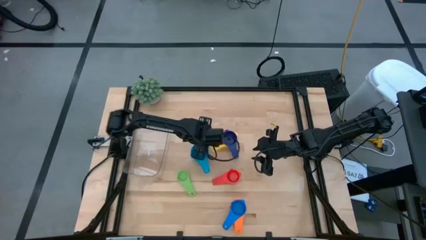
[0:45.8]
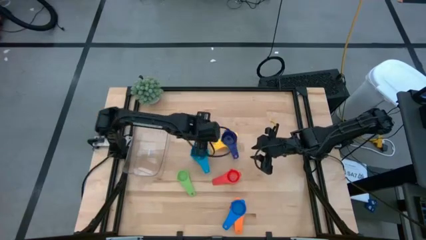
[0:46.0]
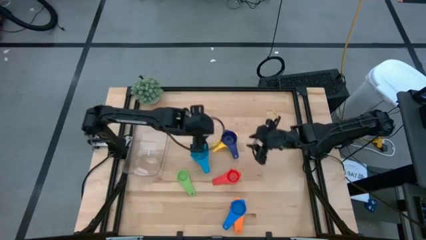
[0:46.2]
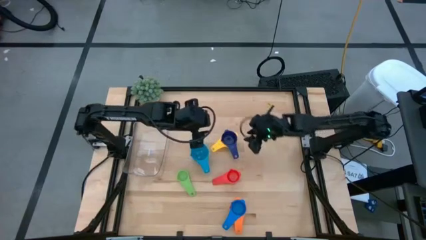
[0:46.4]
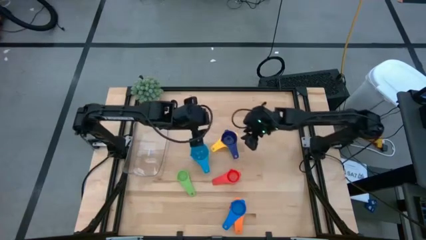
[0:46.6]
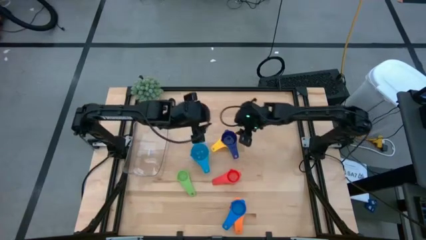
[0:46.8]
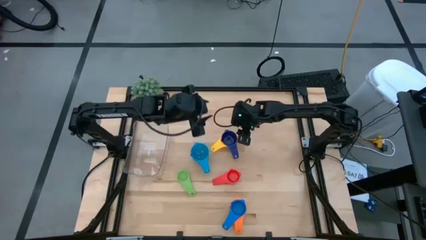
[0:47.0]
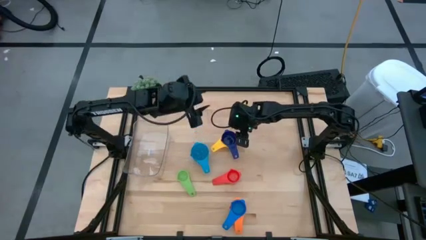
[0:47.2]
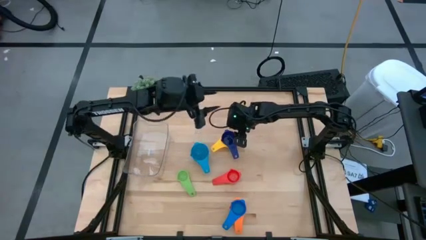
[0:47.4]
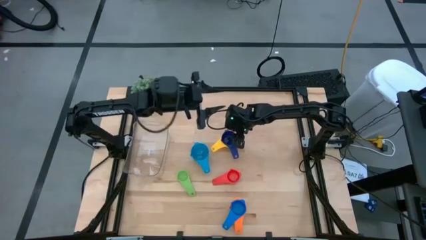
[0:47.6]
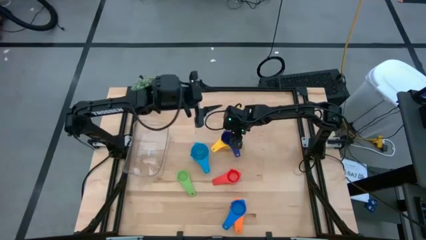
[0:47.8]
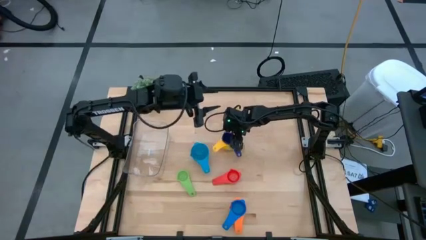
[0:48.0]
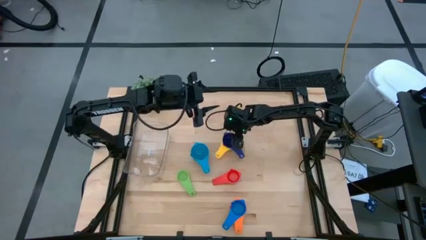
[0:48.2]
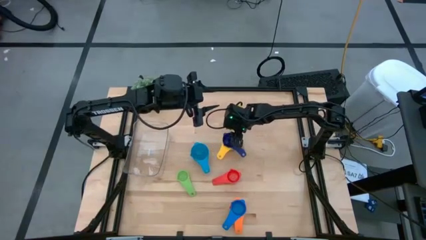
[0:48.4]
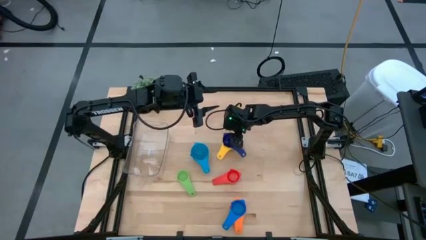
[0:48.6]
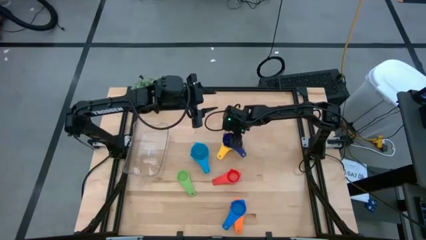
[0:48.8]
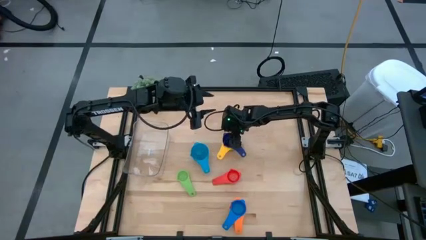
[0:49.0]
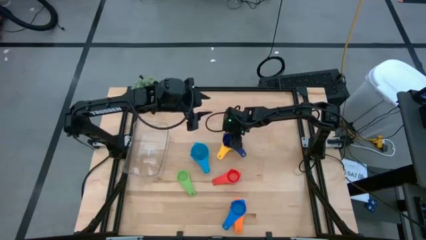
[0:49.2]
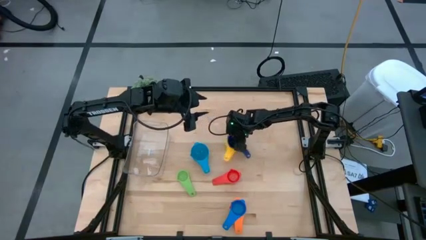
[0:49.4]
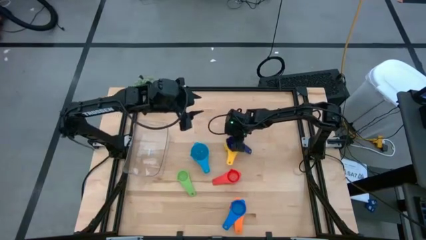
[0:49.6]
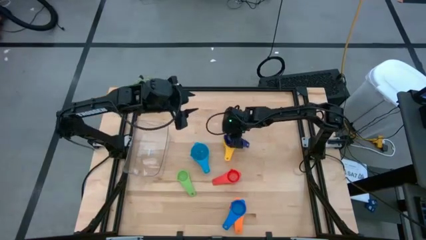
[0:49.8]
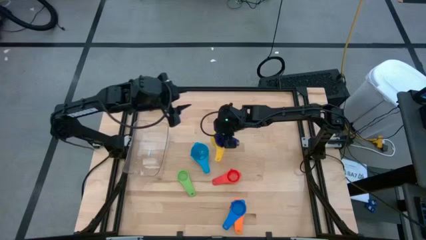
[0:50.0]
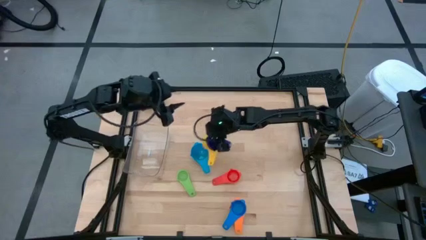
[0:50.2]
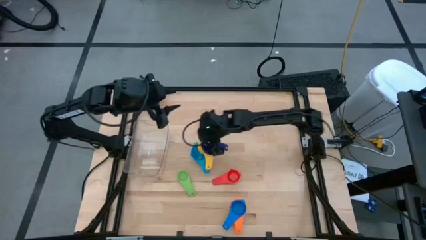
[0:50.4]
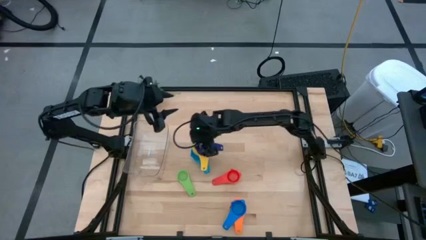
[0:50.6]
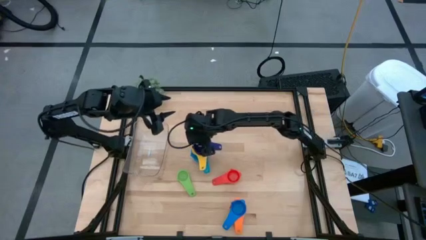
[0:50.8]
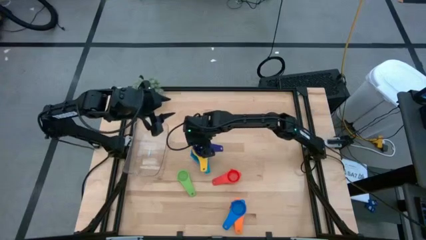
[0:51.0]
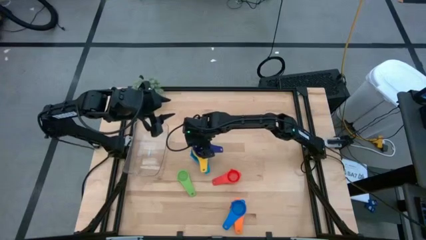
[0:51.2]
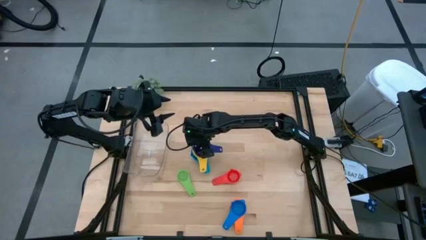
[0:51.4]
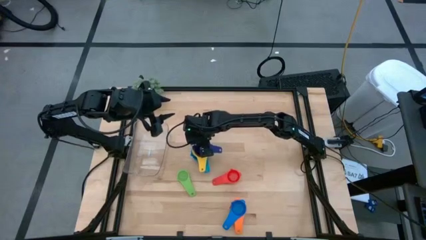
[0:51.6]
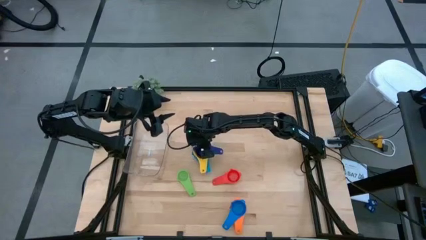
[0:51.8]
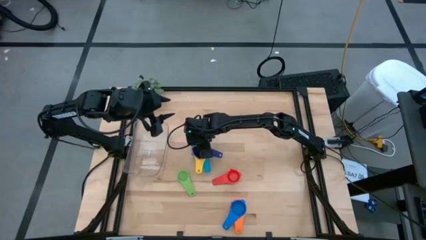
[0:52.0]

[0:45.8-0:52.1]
Task: Nest measuring cups in basket
Stack the top stacked measuring cup on top of the blue measuring cup

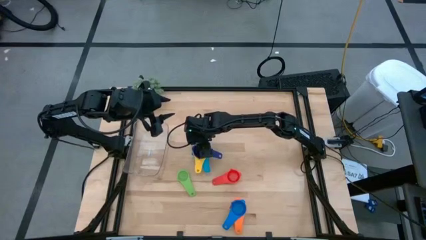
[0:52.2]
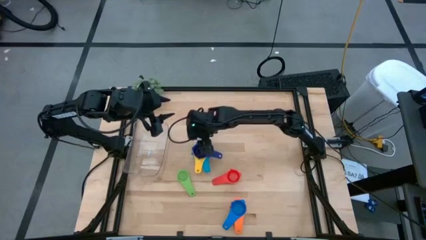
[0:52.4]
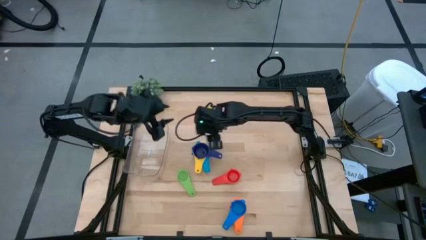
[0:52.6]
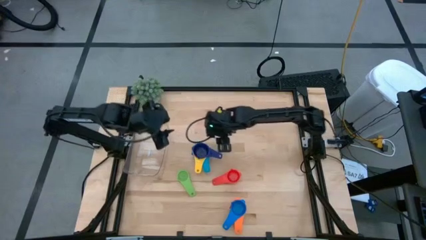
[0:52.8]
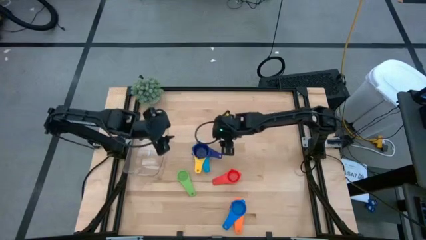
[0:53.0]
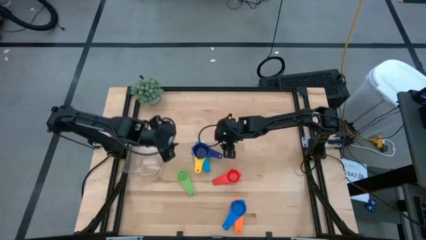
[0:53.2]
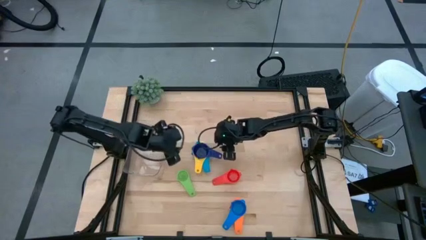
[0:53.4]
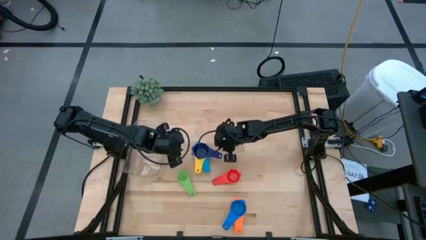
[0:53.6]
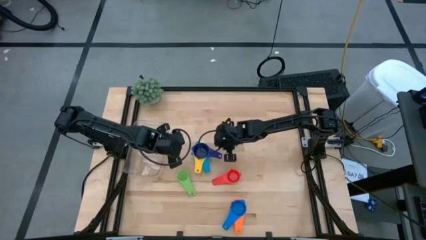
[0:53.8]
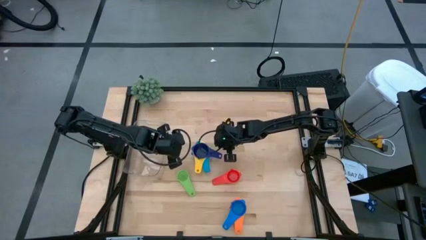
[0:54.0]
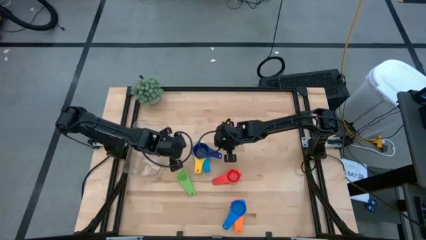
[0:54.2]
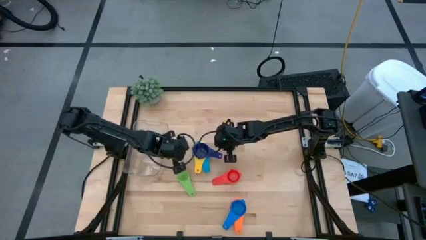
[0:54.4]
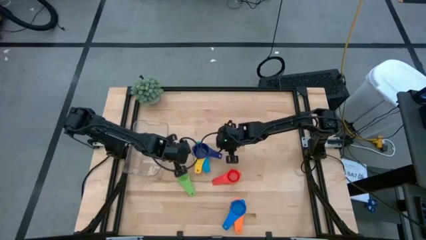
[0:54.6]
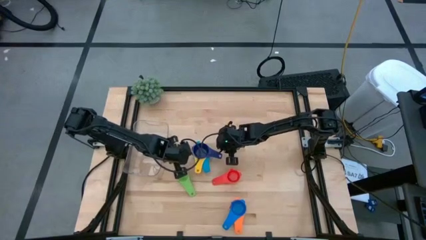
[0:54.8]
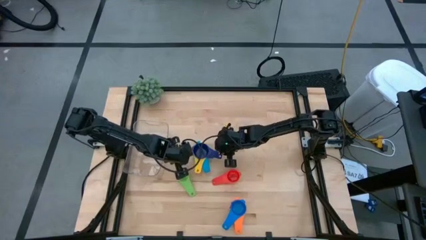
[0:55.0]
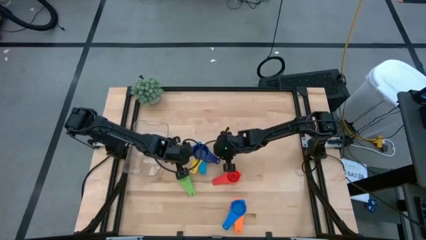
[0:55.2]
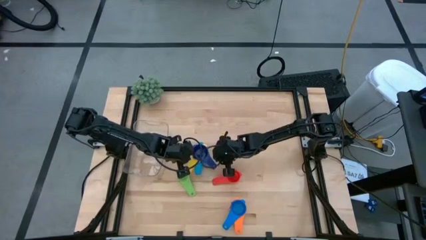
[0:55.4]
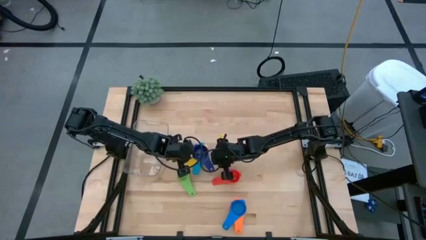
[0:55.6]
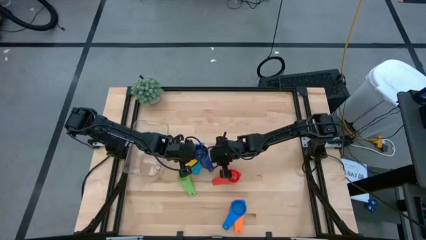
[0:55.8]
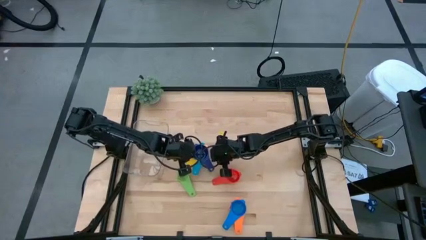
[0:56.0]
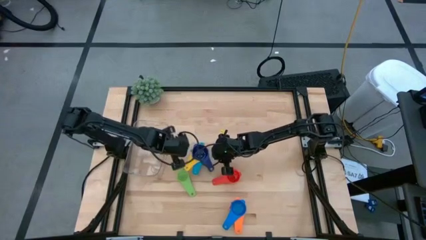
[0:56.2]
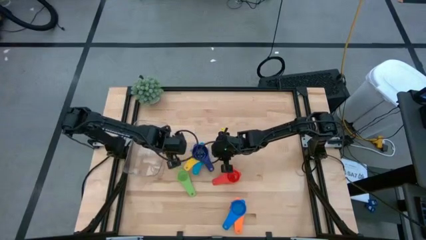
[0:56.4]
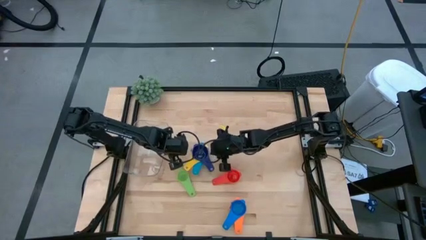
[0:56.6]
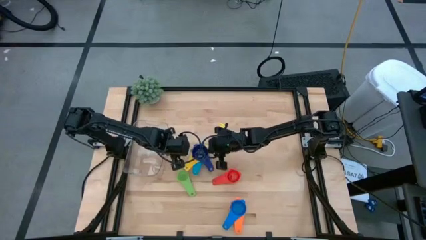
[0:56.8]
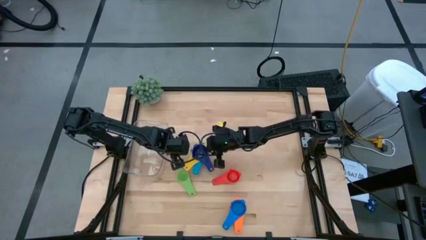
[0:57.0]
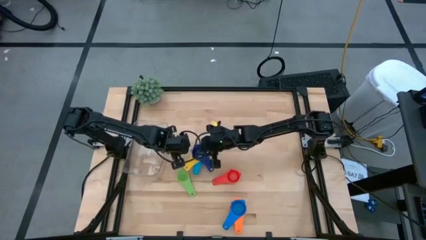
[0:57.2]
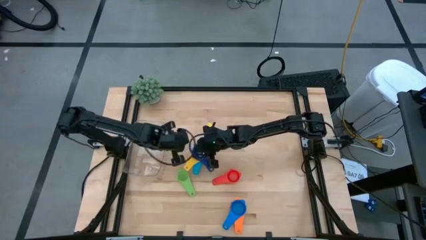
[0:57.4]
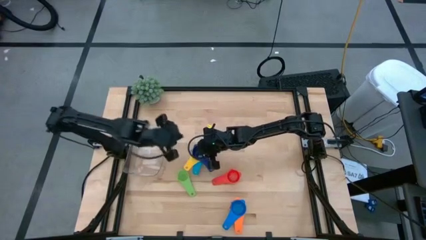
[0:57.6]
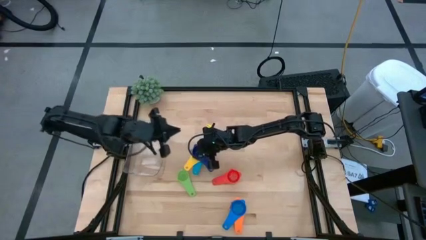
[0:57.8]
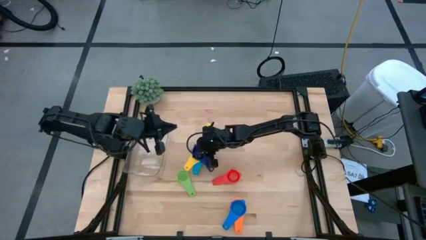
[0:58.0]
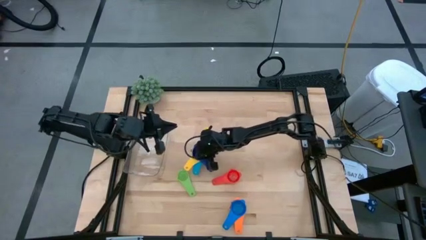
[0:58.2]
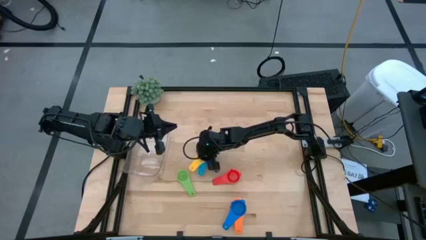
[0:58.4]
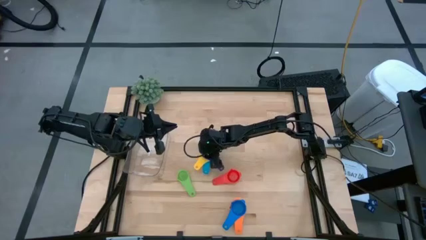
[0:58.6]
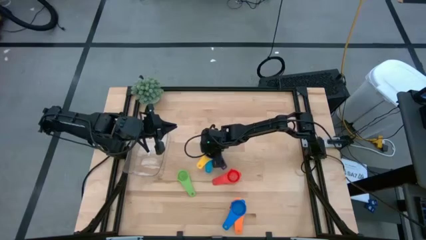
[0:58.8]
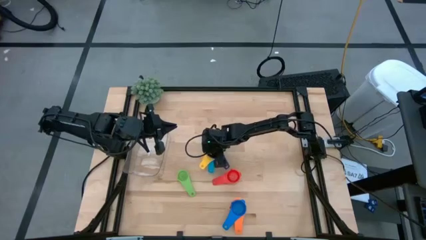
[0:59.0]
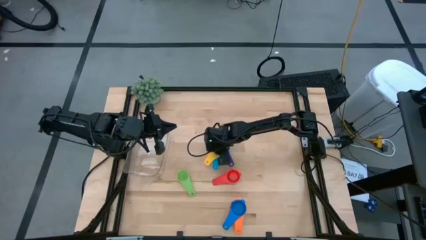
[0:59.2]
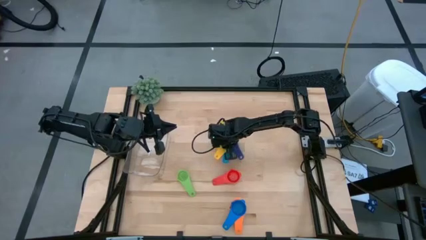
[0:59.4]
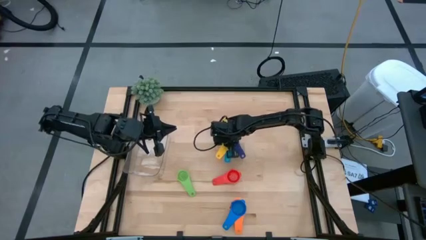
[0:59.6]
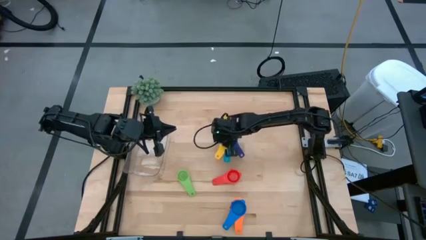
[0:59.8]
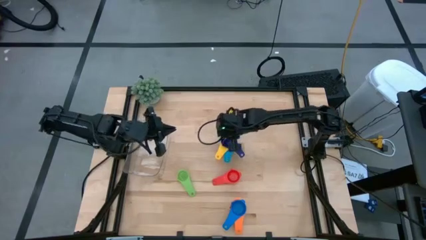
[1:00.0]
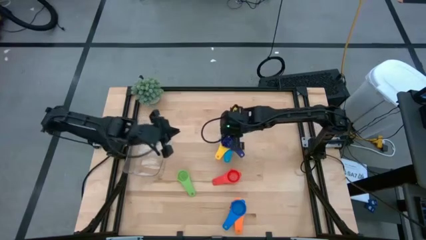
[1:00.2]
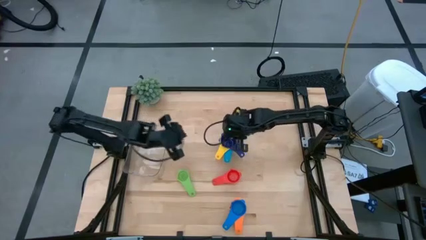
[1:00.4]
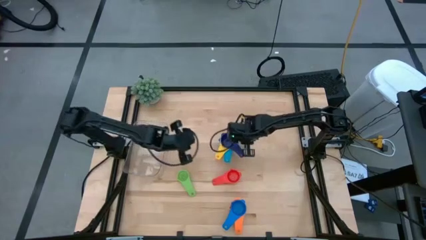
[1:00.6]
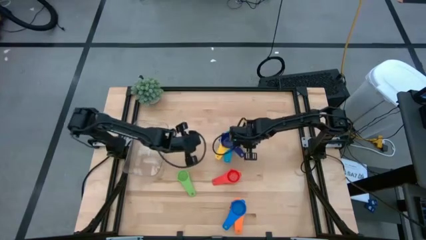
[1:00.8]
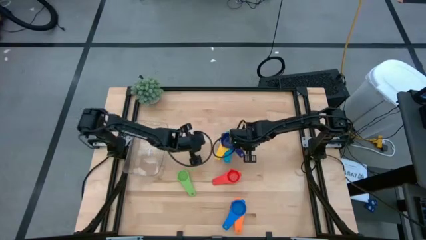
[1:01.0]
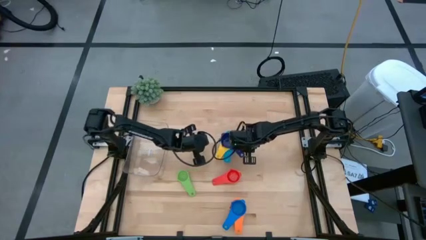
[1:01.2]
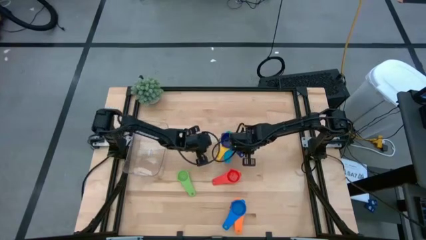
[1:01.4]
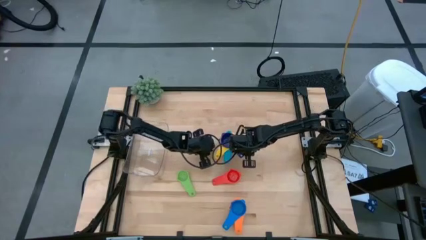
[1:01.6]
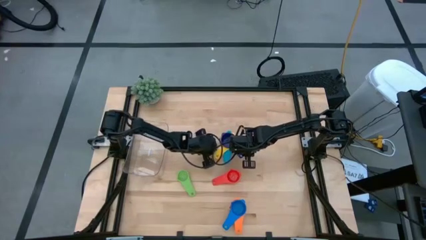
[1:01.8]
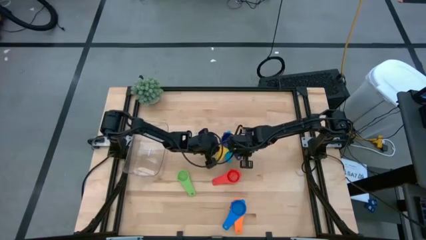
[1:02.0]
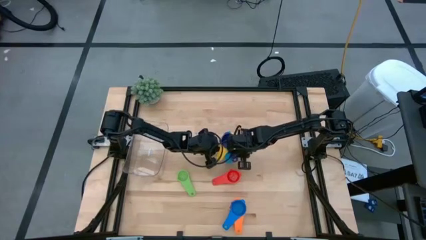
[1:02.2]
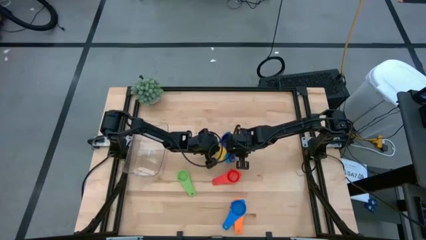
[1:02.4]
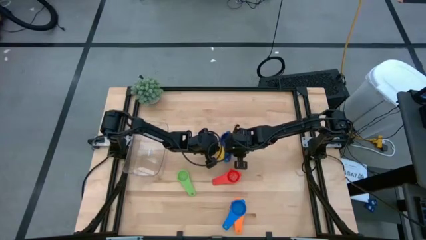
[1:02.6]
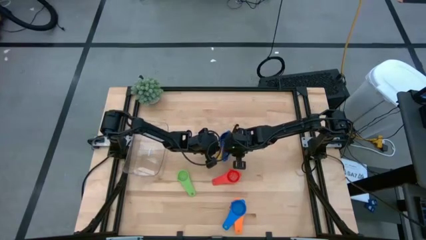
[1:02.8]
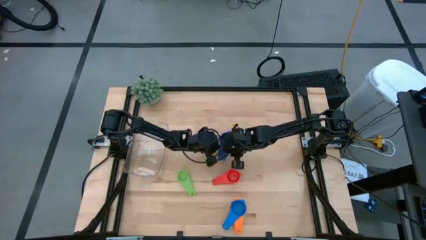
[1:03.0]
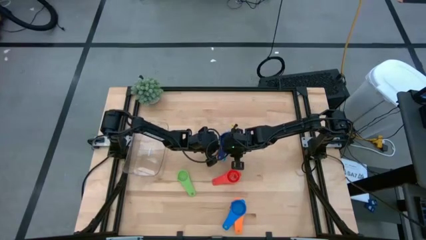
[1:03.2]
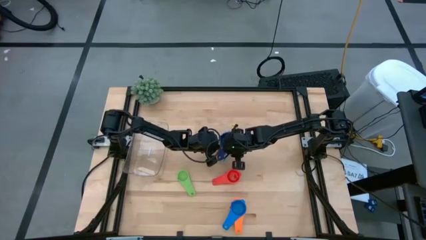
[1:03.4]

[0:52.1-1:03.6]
Adjust the top stacked measuring cup on the table
